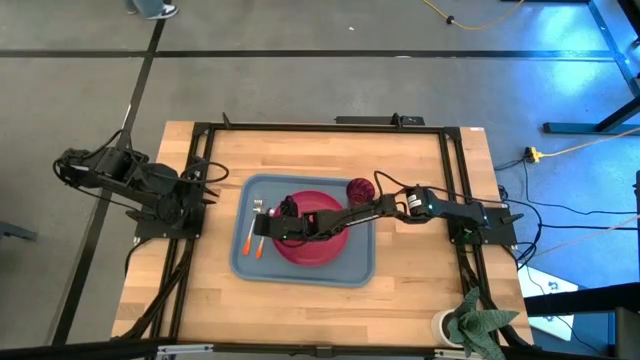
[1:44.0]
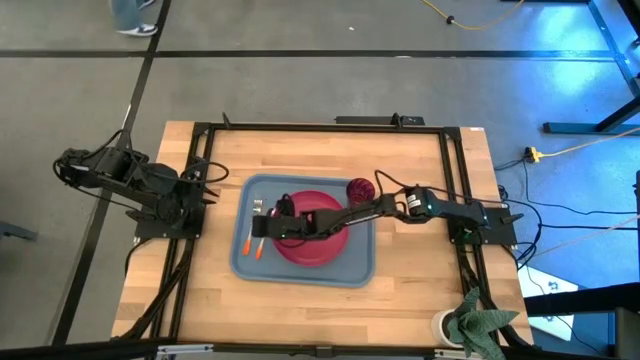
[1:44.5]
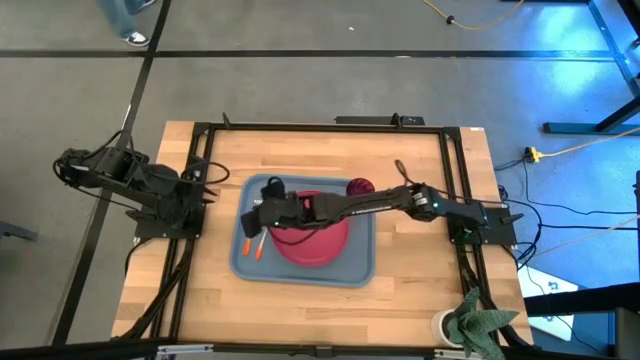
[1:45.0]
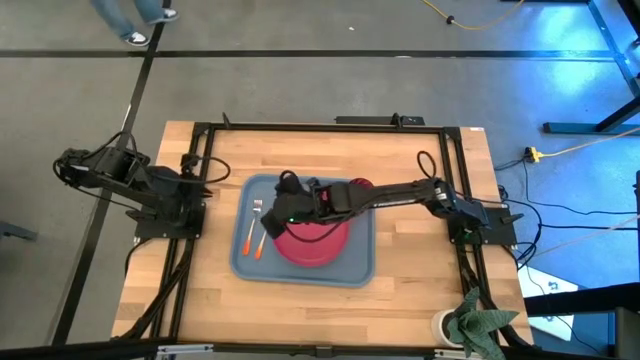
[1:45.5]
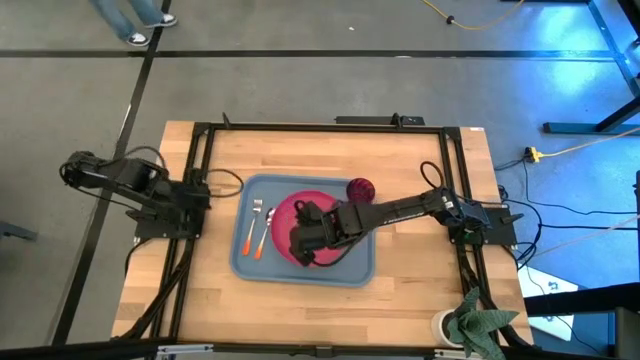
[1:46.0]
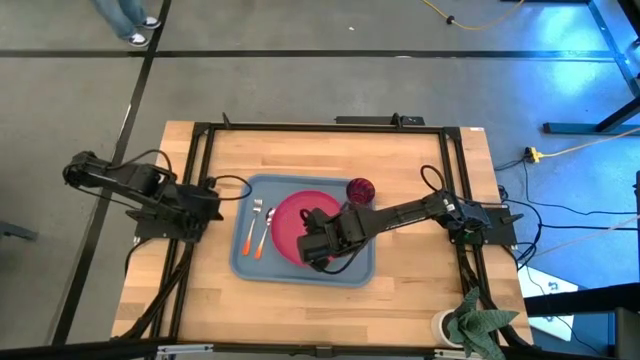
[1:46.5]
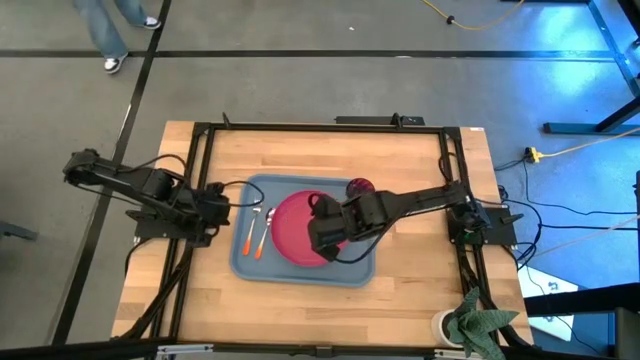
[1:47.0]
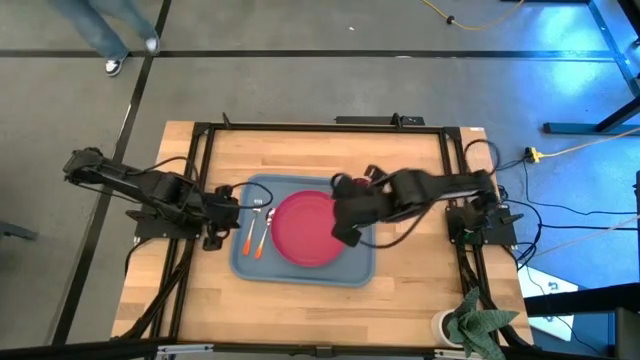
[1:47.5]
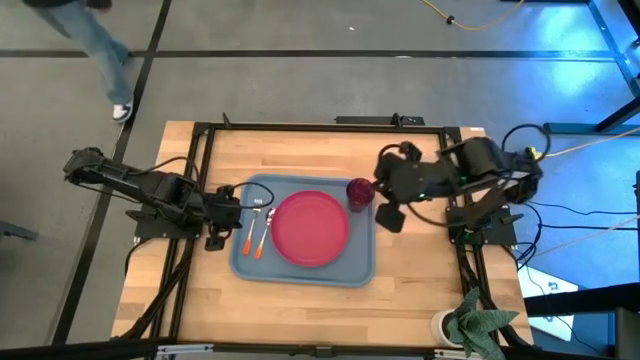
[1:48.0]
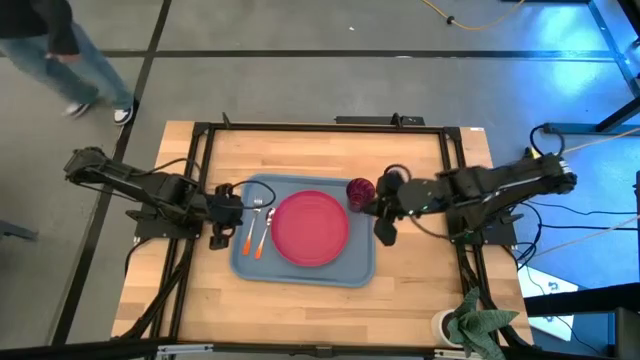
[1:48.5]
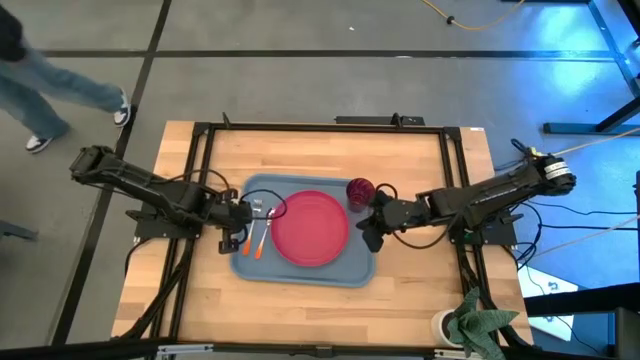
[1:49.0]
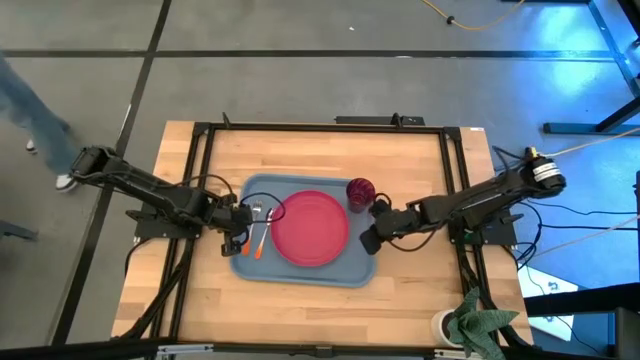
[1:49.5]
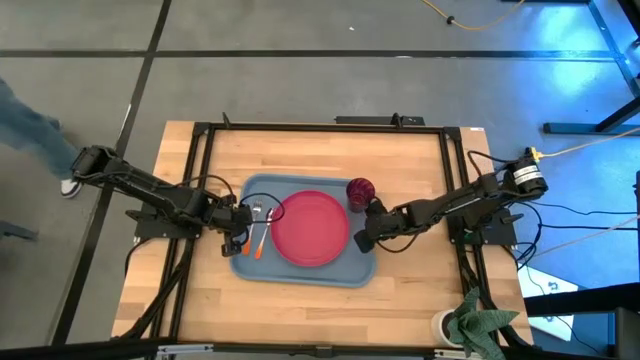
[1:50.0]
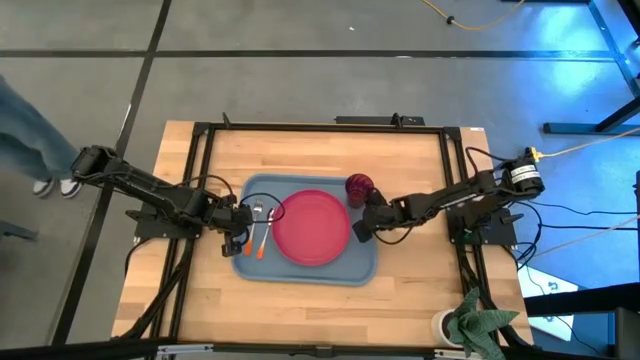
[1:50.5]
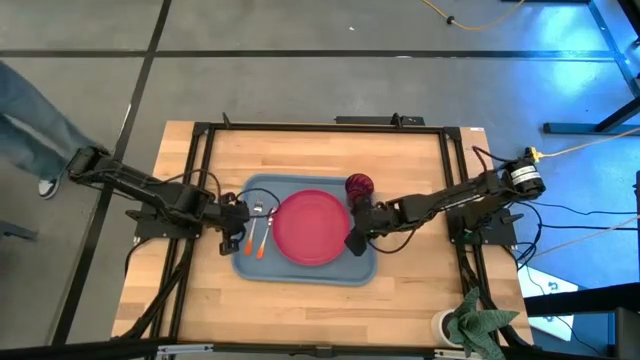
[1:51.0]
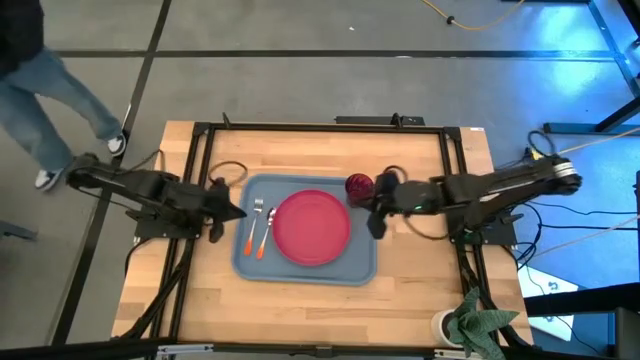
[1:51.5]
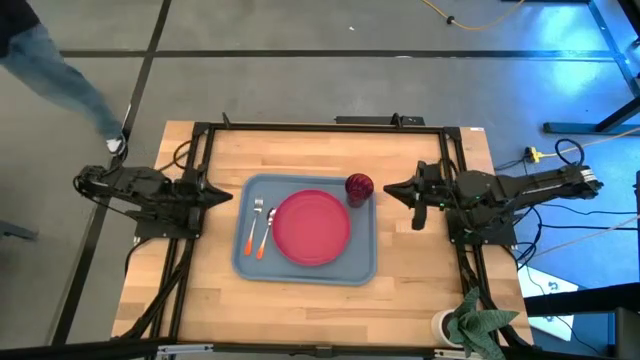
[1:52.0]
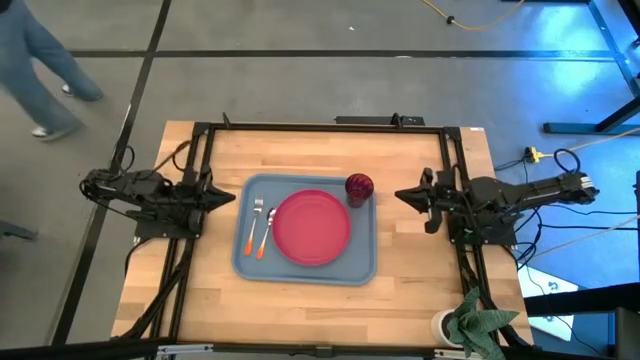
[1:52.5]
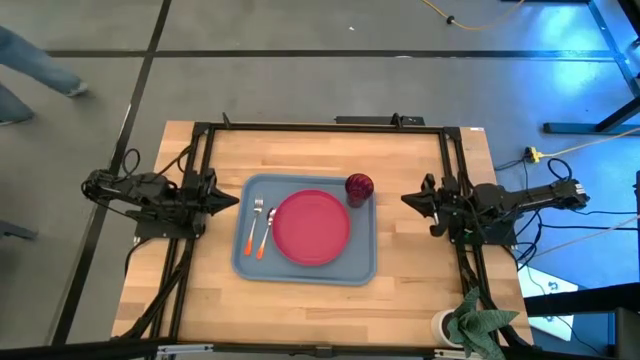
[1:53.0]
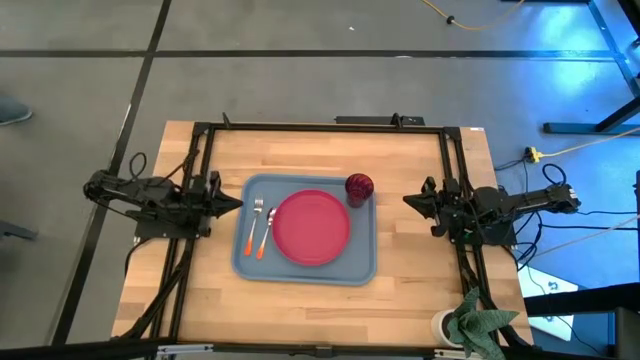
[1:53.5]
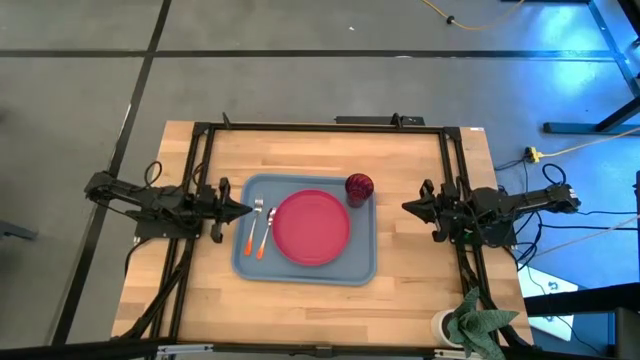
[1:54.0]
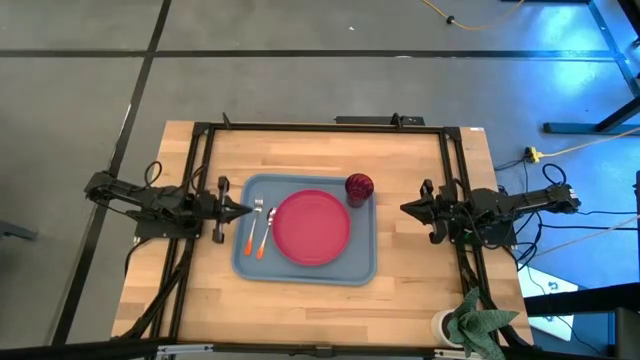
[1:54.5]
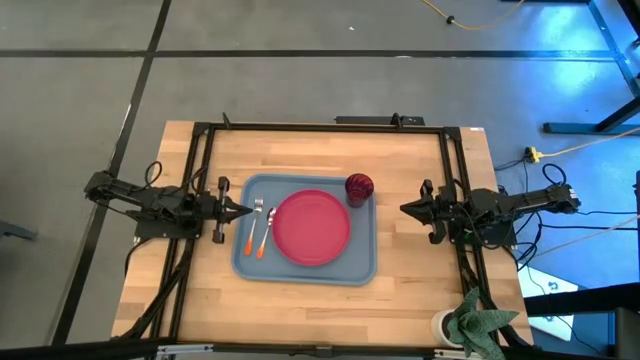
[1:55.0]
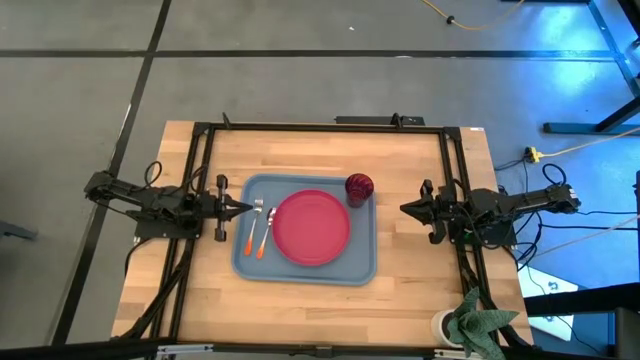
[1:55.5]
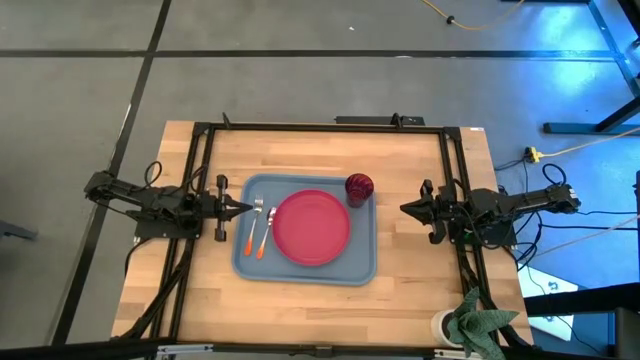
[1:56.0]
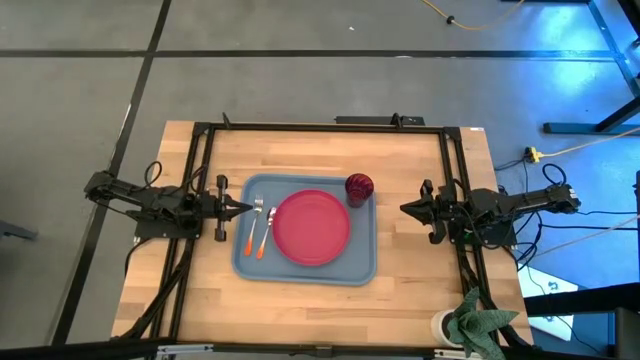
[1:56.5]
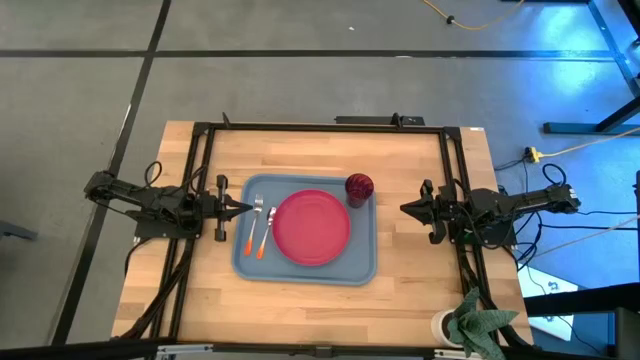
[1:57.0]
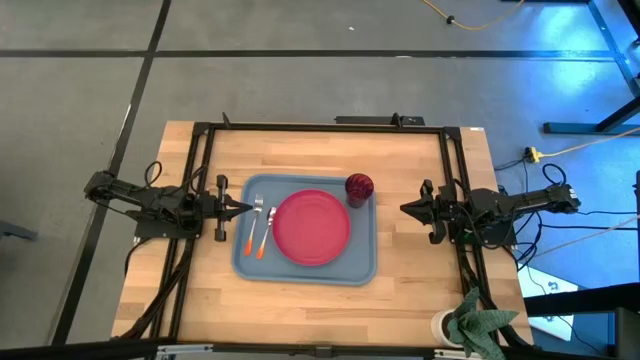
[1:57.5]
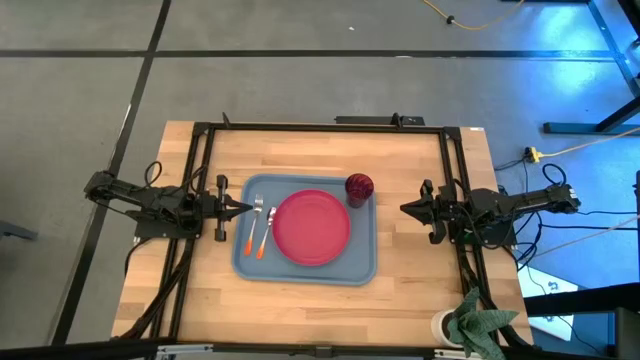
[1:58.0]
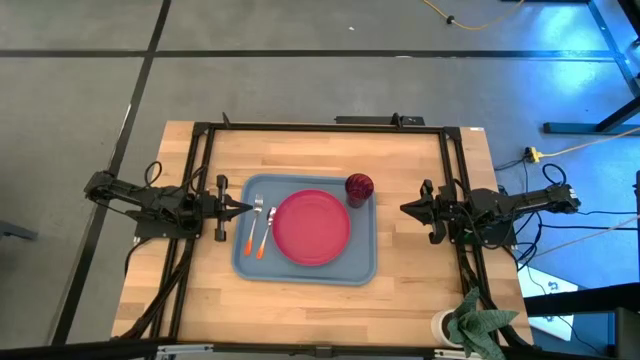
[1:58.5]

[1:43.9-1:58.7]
Task: Pick and place plate/cup/fork/spoon on tray
Return to Home Position

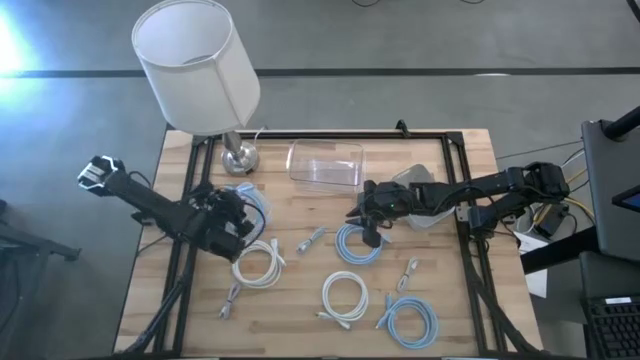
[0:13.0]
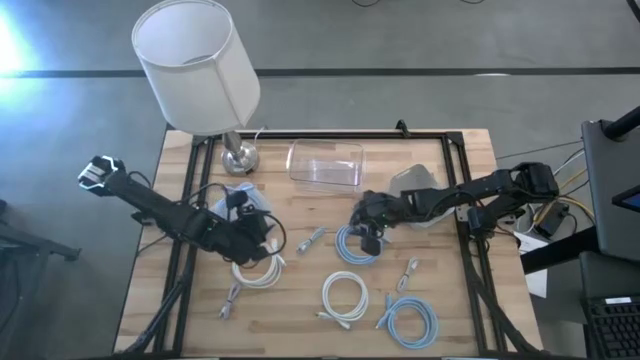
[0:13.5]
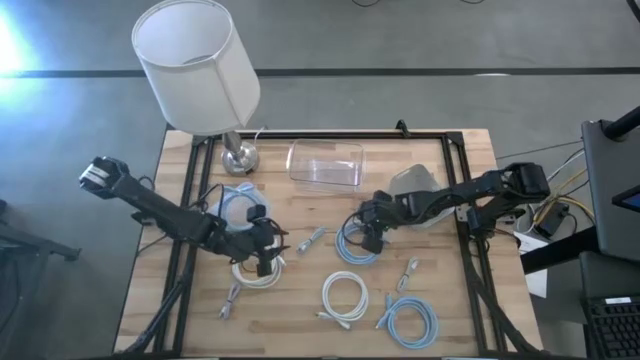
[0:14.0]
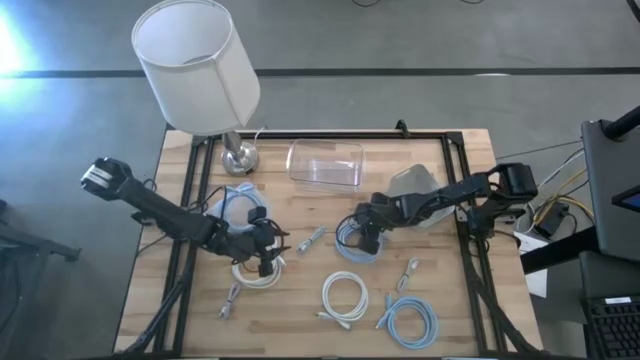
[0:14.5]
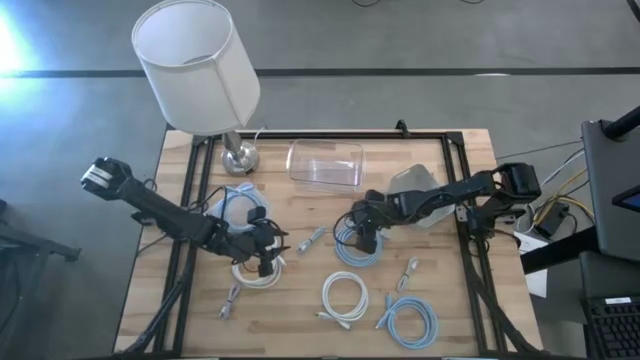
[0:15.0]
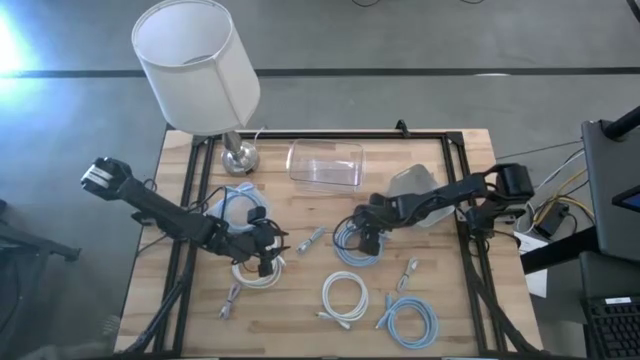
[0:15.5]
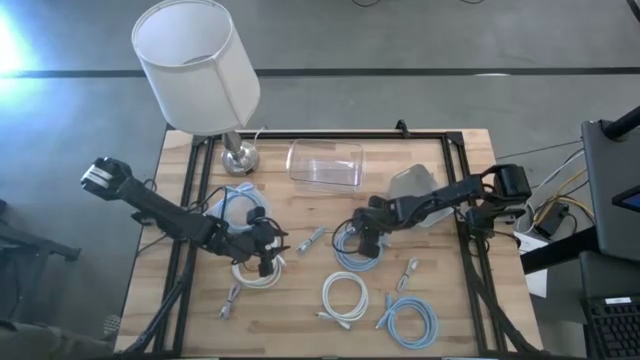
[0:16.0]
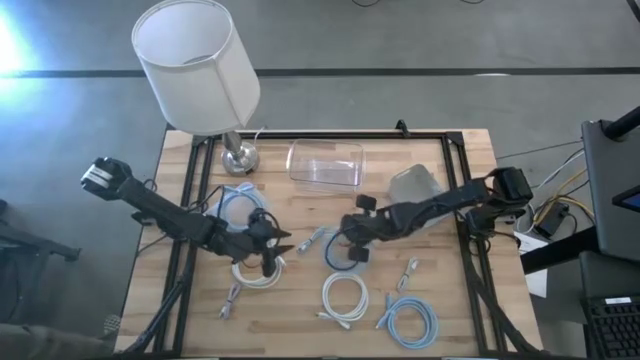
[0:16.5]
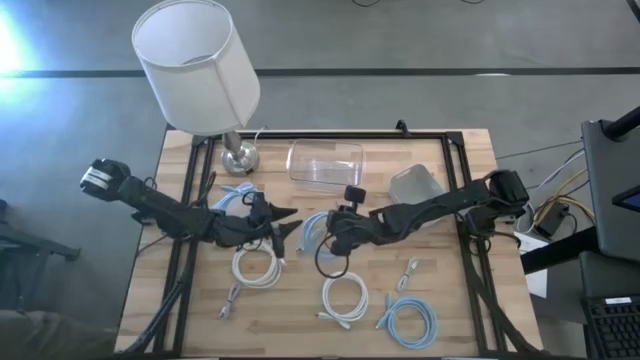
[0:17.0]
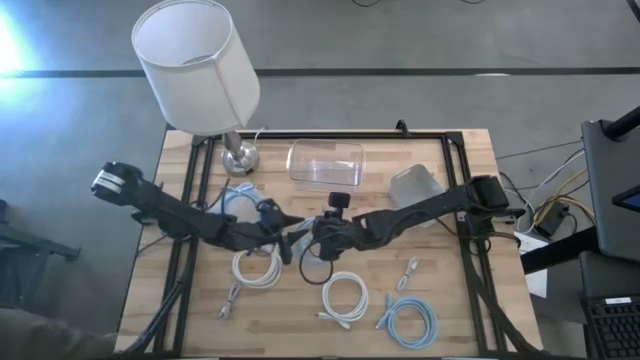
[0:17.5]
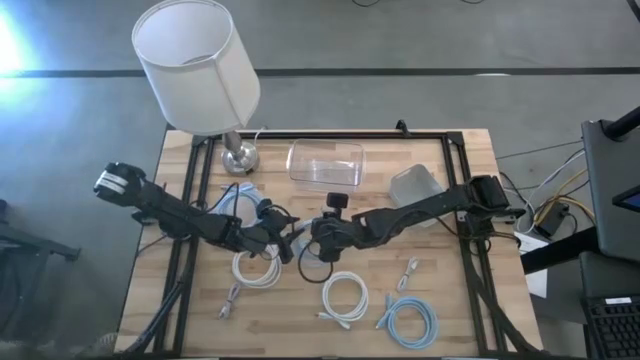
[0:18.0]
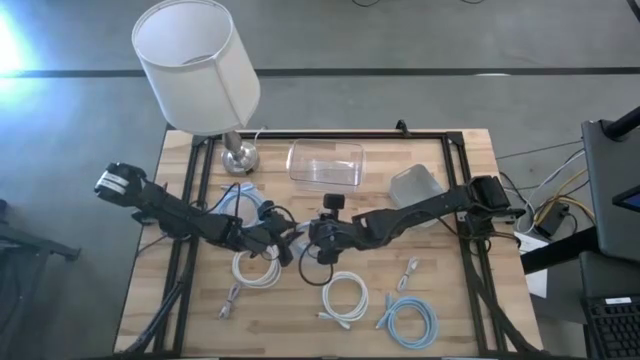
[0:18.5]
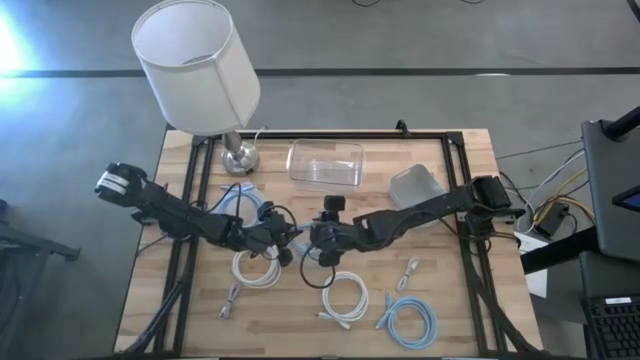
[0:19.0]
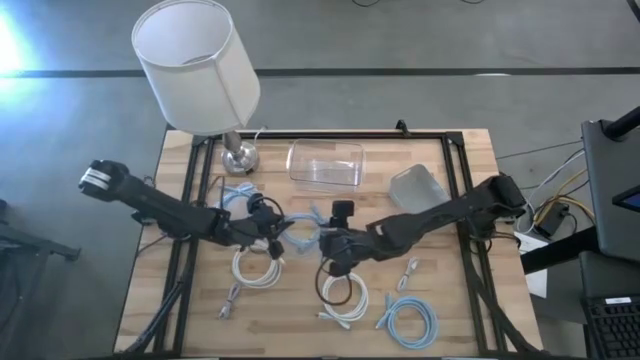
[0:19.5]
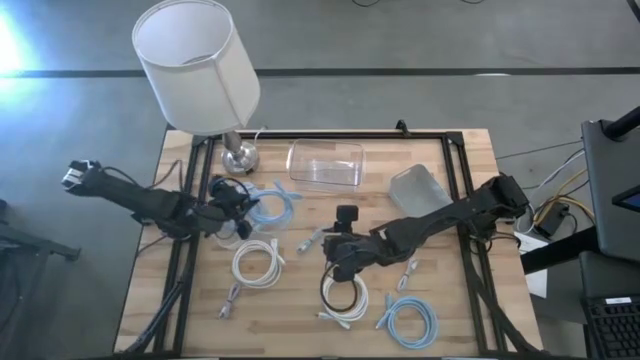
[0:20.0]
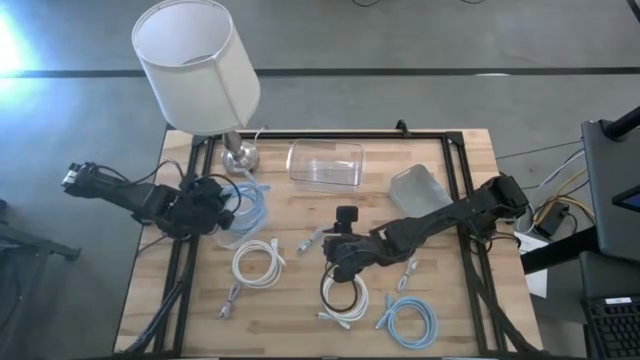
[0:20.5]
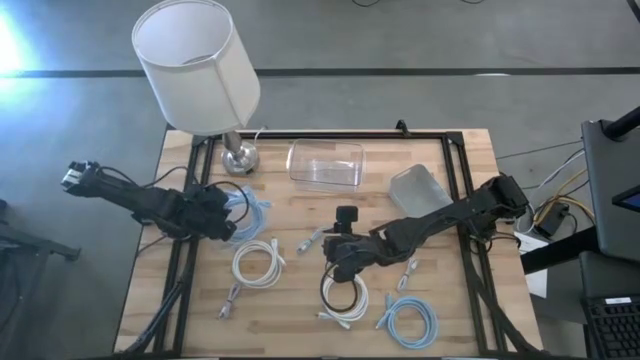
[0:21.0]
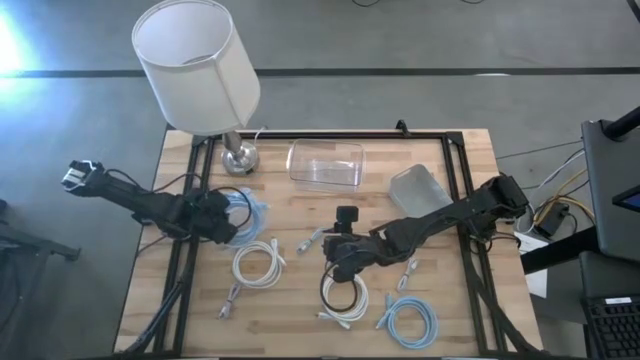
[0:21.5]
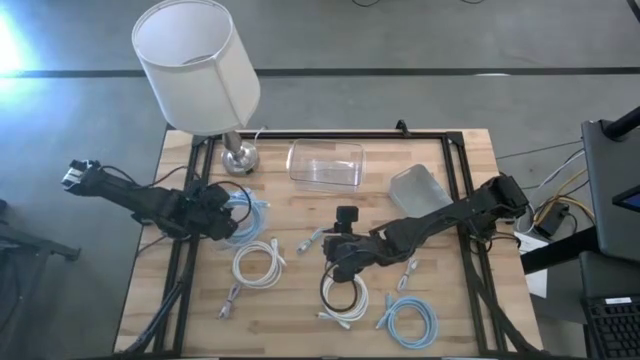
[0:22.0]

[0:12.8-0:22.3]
Task: Pick & Place USB Port
Put the top light blue HDMI cable into the white bin
